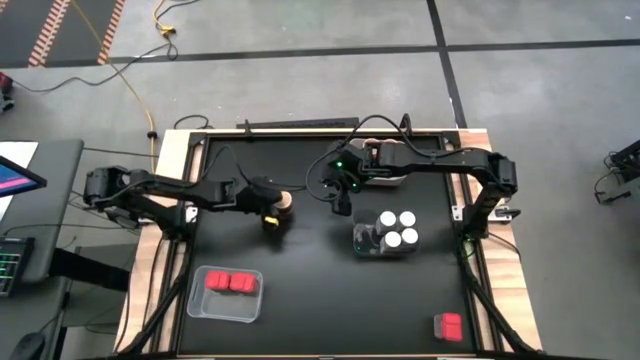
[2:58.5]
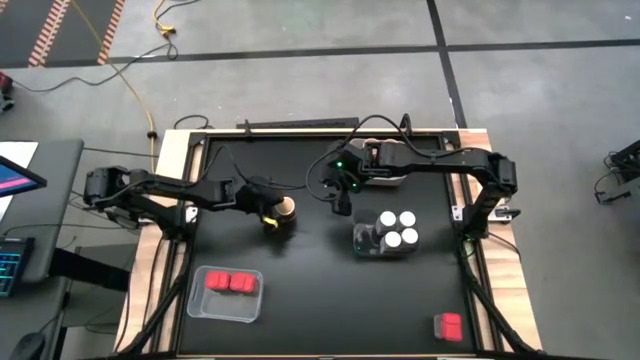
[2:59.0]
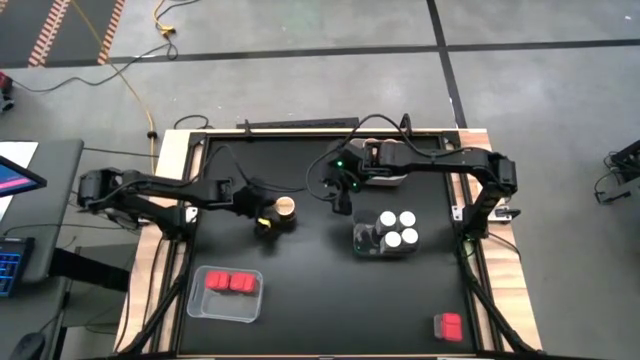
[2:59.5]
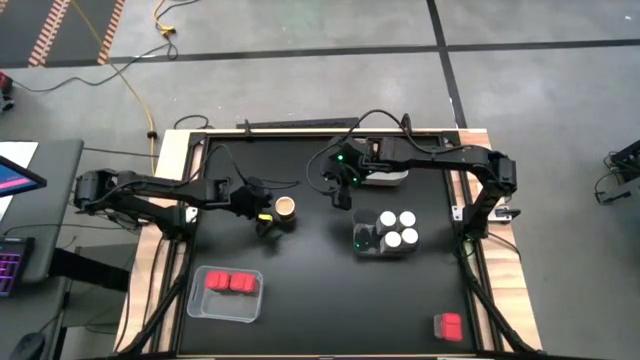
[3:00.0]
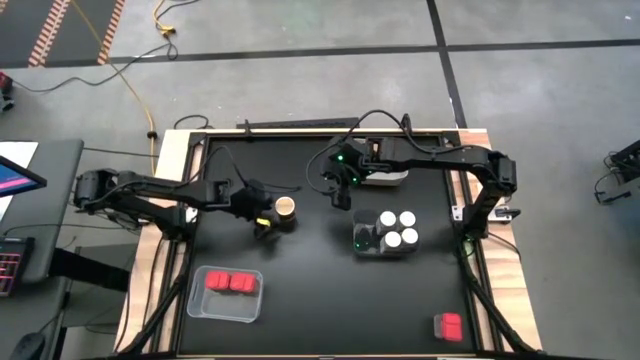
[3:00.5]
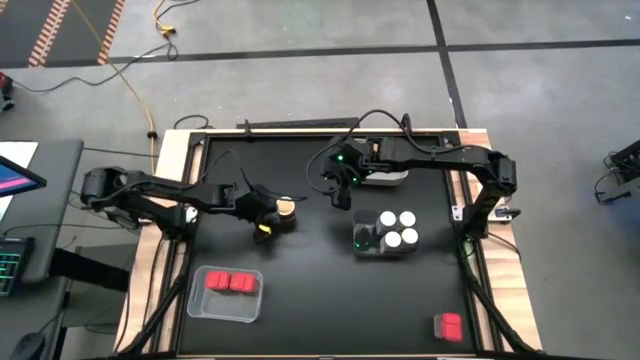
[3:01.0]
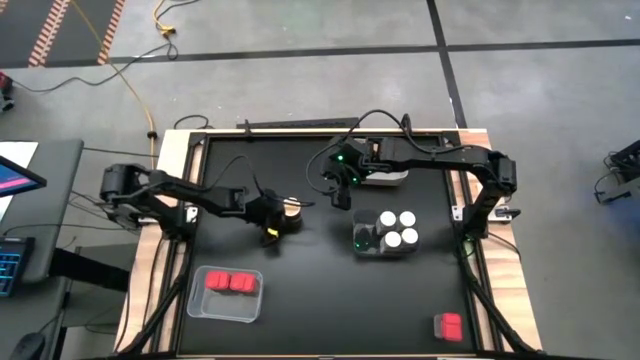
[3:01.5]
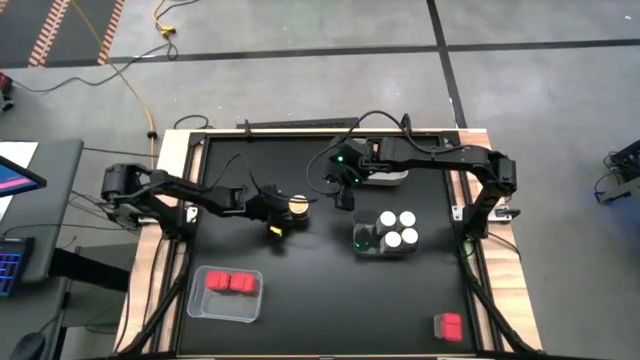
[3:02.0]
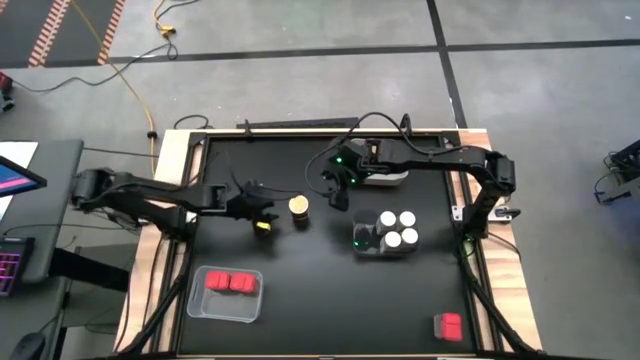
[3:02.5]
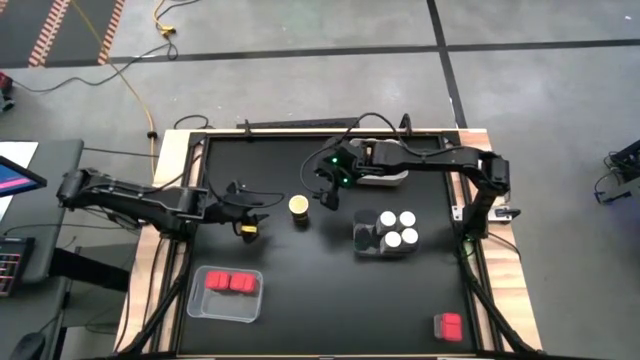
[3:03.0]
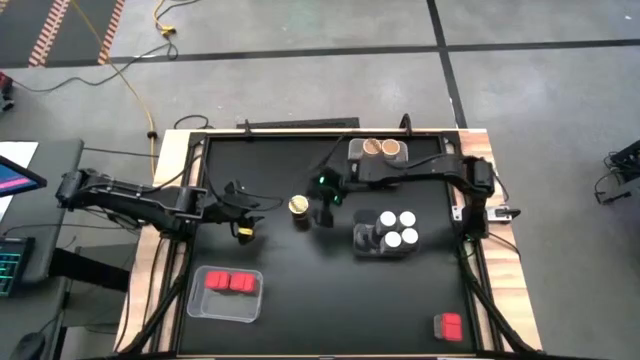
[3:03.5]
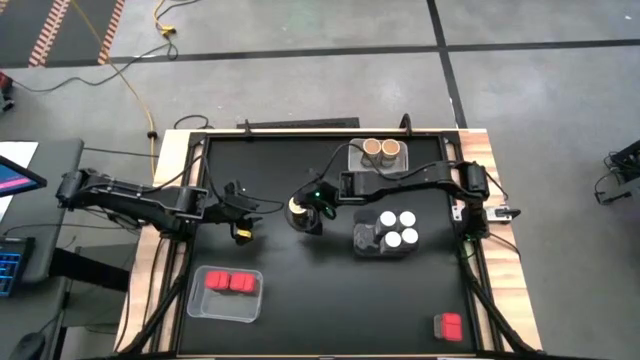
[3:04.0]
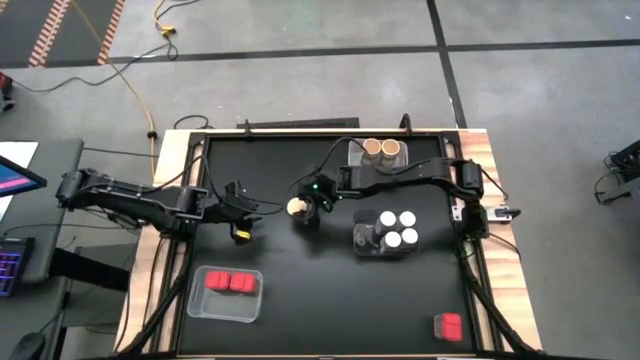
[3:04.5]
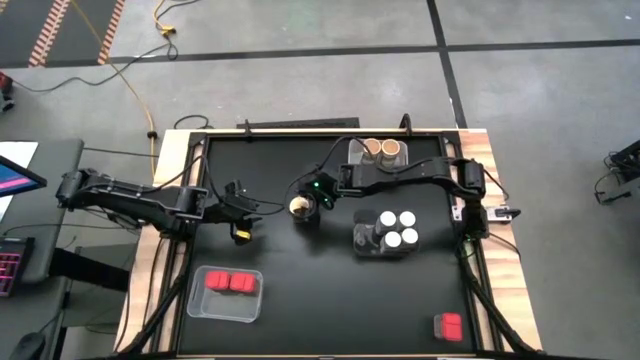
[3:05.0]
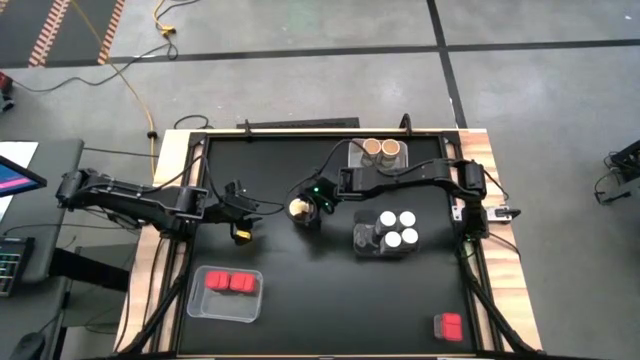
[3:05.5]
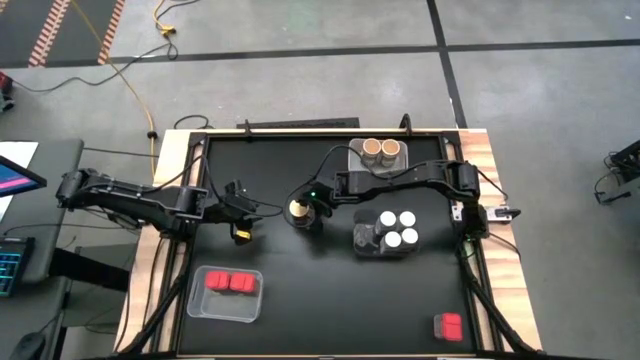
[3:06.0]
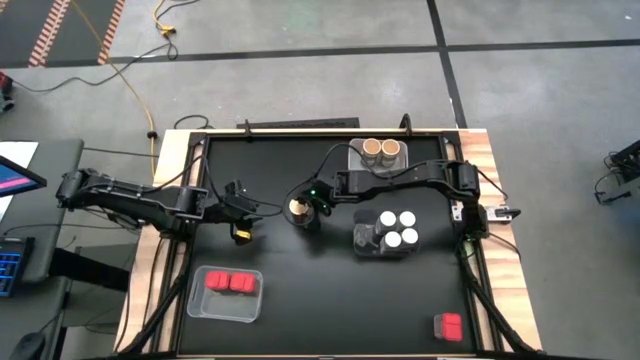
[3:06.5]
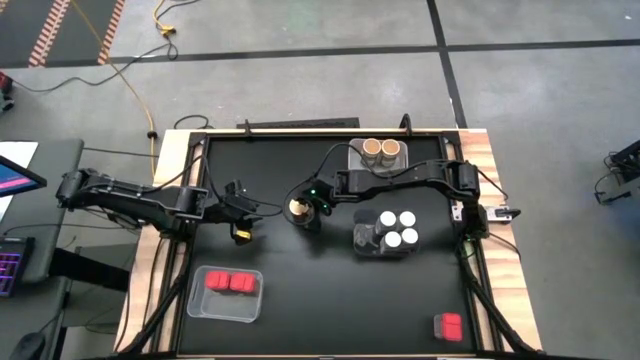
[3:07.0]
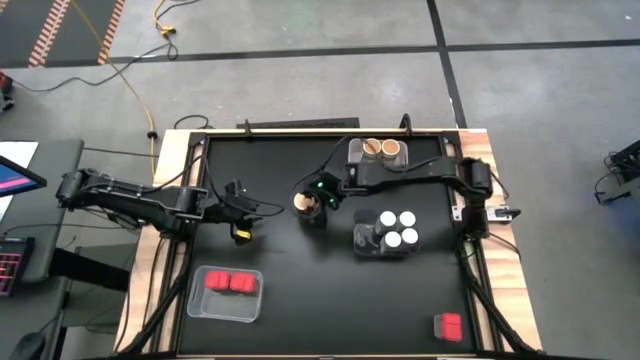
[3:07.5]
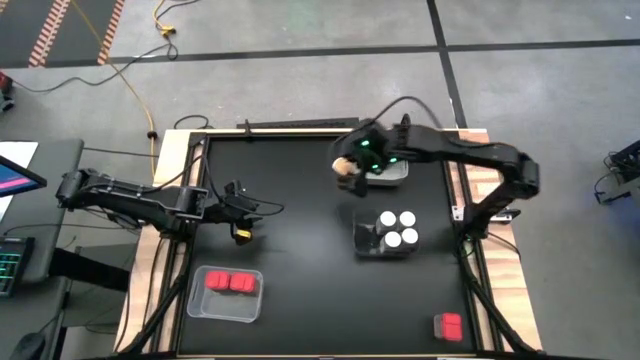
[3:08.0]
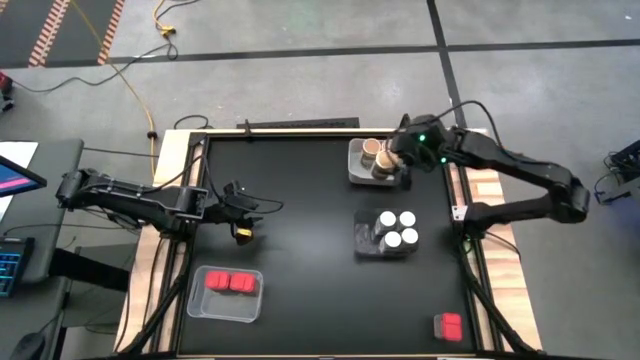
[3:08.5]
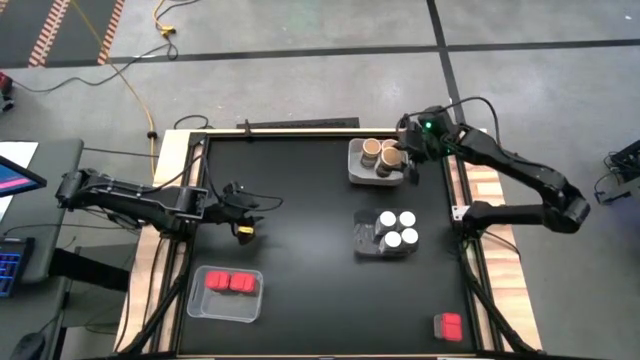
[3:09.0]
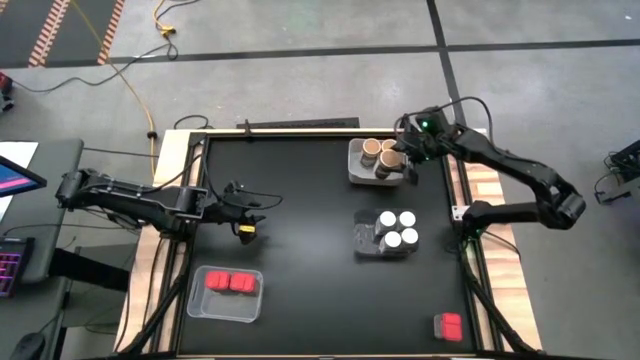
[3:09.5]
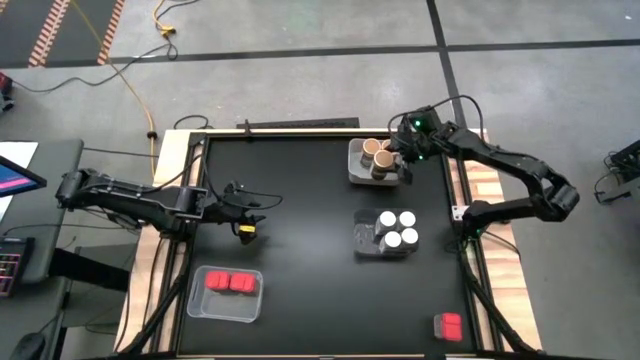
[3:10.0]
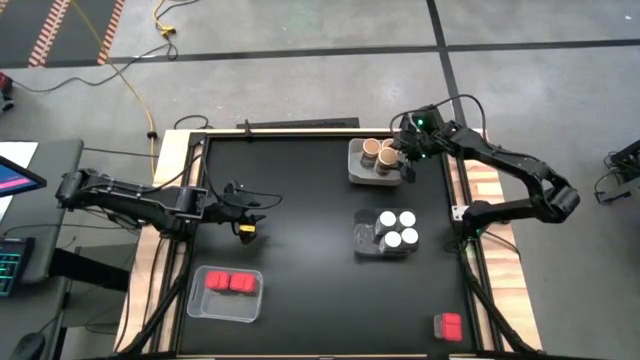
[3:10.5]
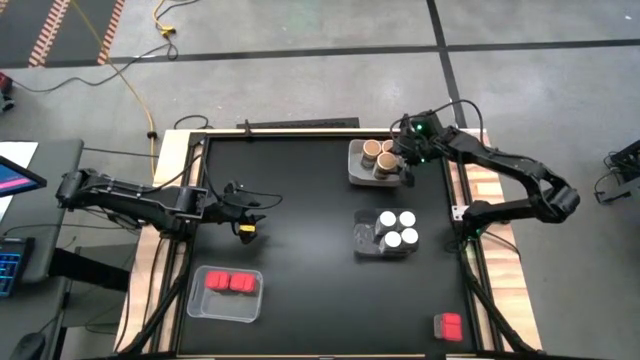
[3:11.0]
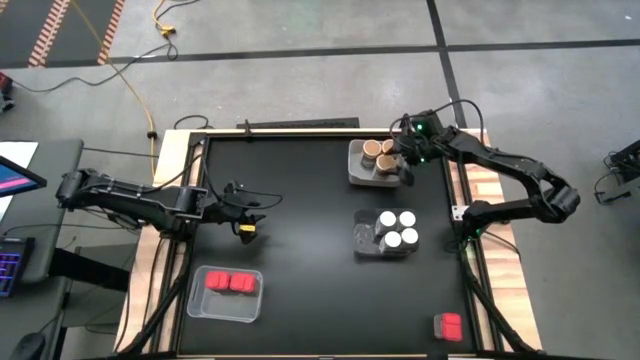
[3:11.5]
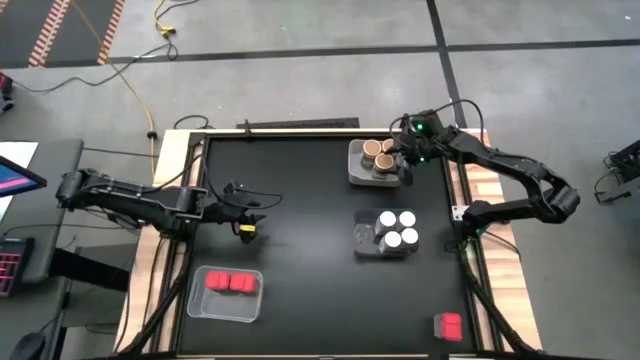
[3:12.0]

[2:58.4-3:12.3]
Task: Sort spices by type
Put the gold spice bottle in the gray bin

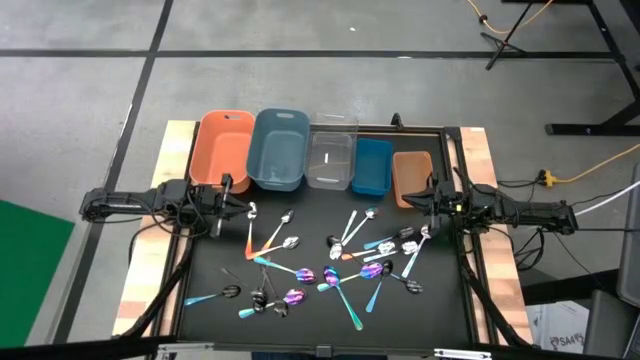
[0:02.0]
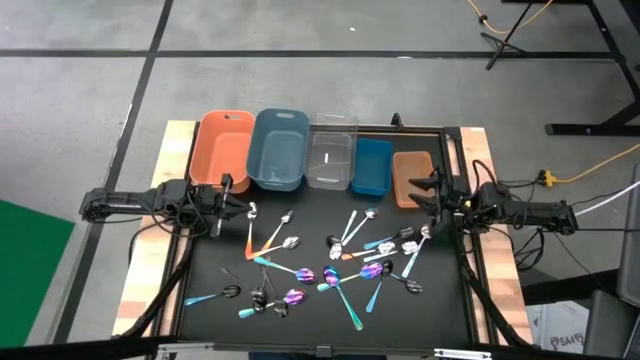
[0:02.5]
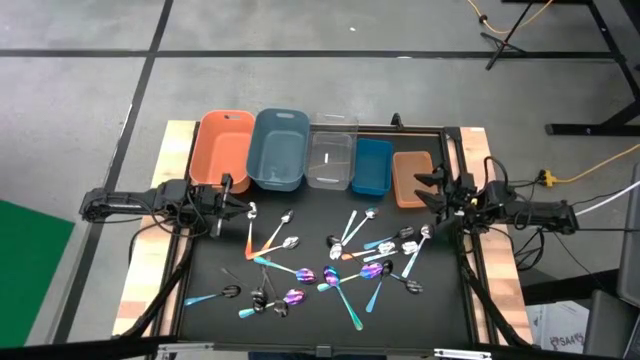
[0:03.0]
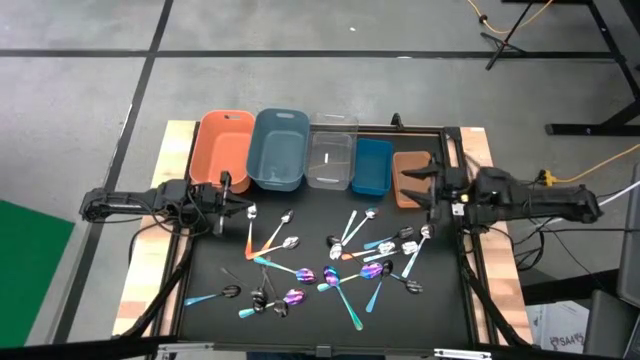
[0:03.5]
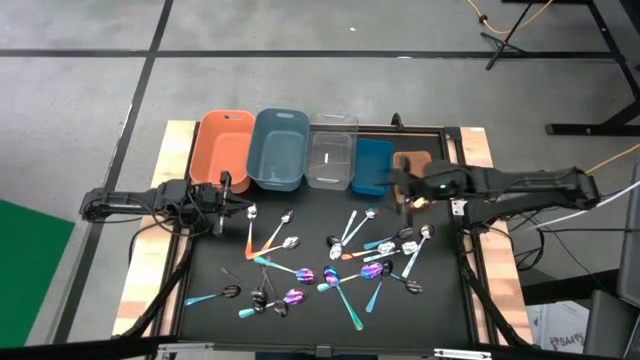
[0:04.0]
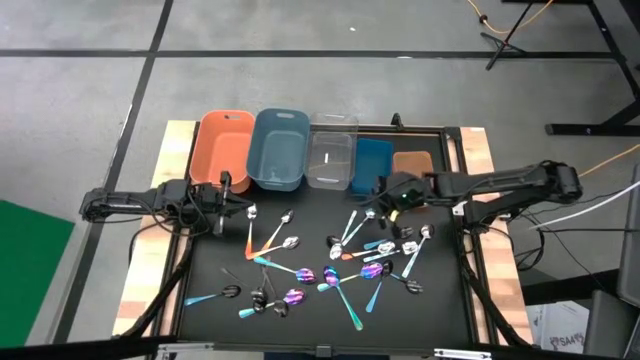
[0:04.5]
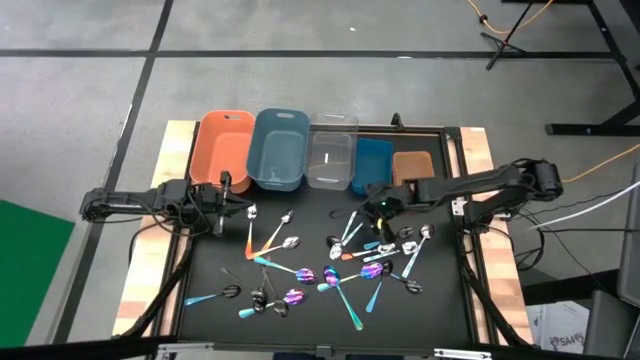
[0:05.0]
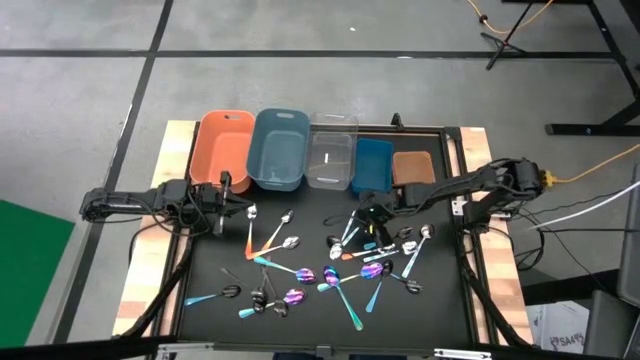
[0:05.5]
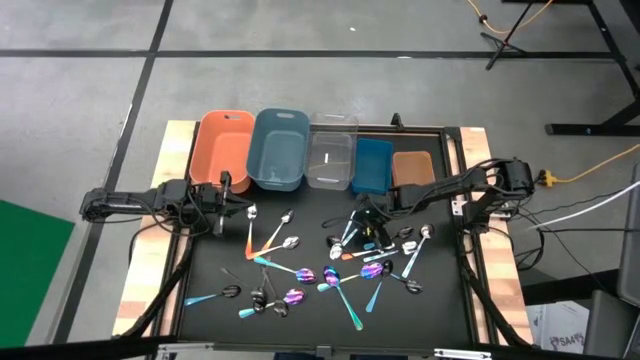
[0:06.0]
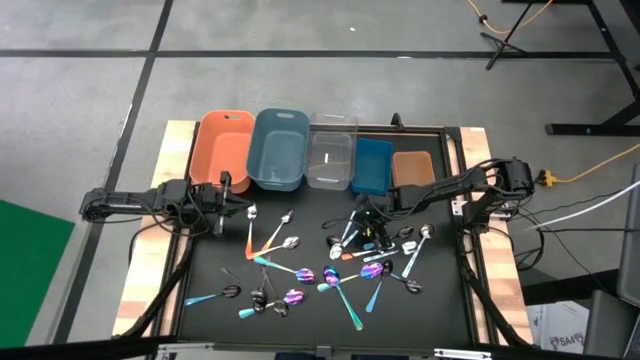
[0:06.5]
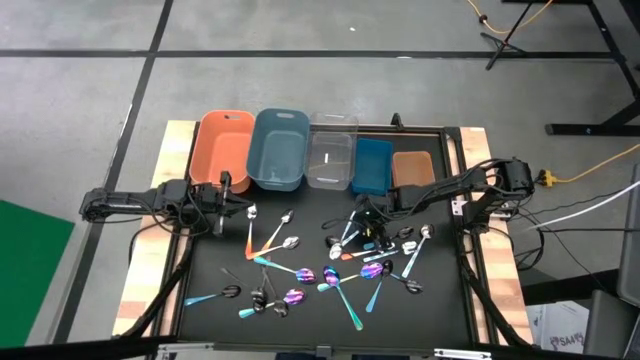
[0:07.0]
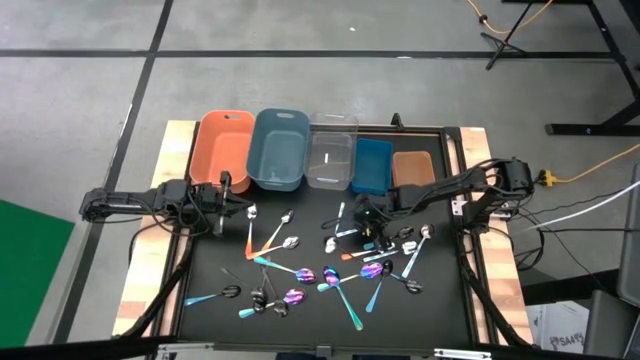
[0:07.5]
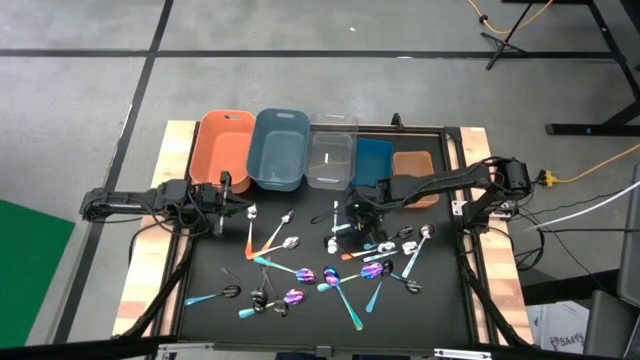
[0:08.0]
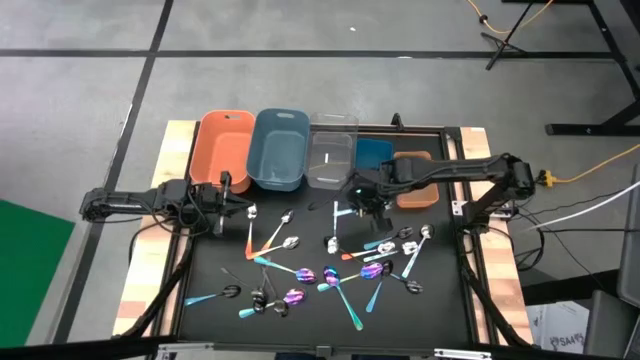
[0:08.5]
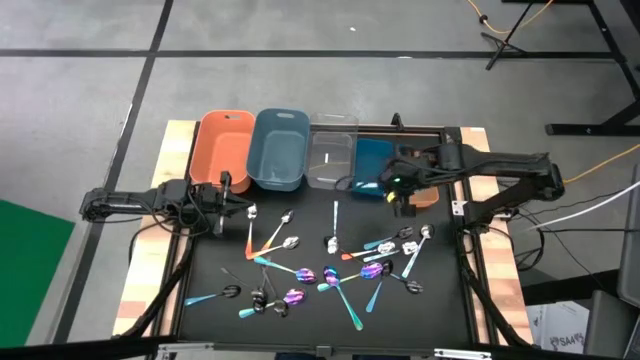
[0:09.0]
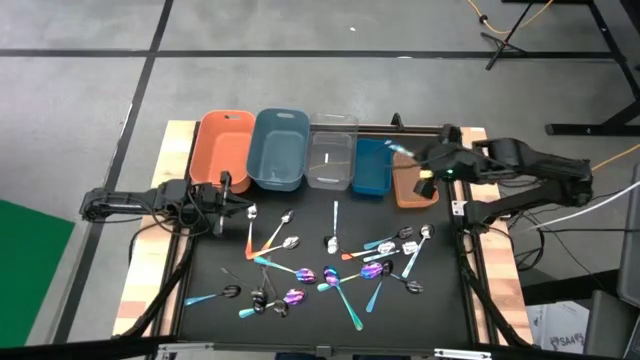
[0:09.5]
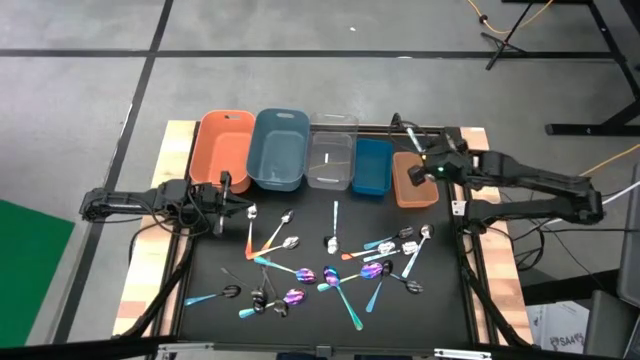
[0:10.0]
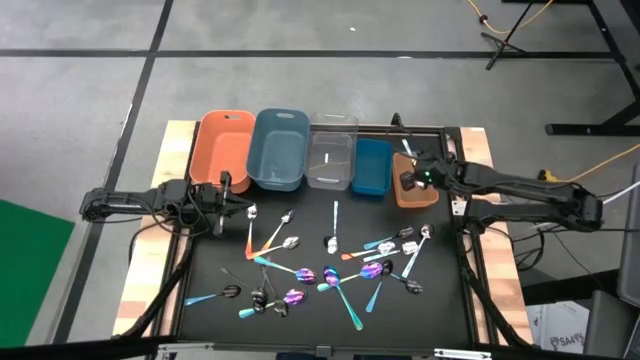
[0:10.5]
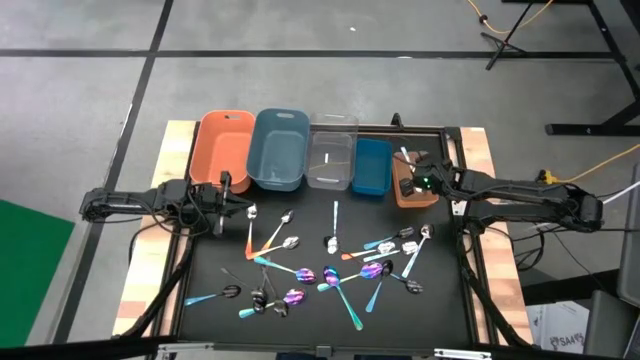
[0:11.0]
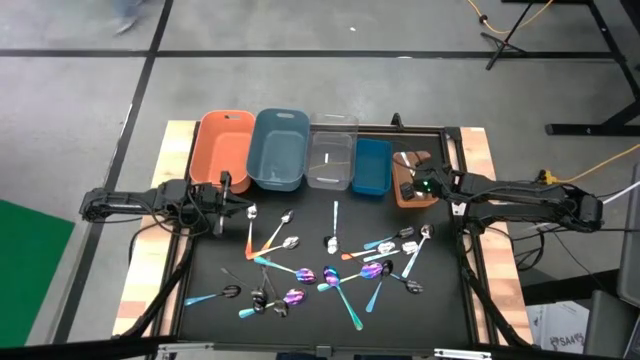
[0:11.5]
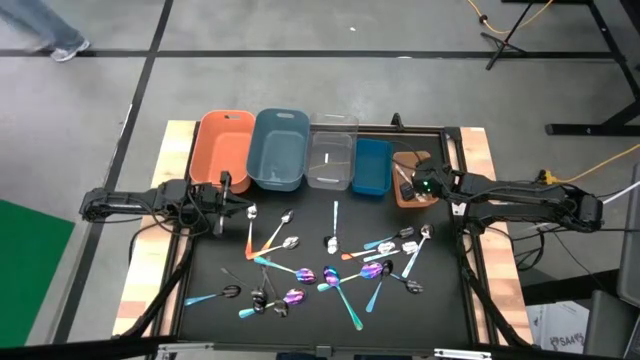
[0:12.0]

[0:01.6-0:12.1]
Task: Sort silverware by color (type)
Put the white and blue spoon into the right orange bin
